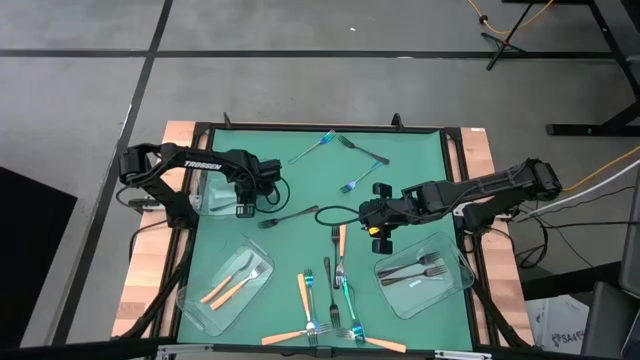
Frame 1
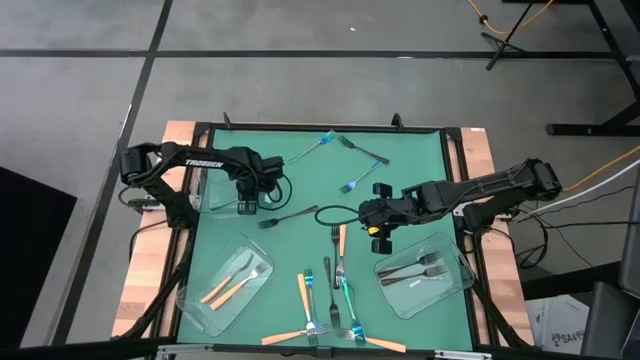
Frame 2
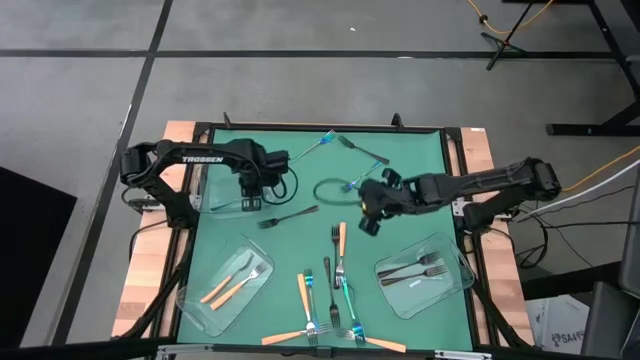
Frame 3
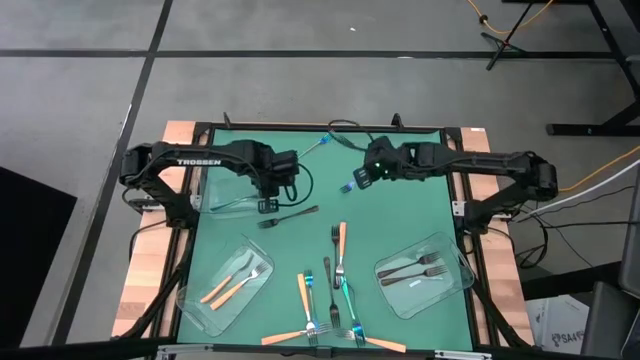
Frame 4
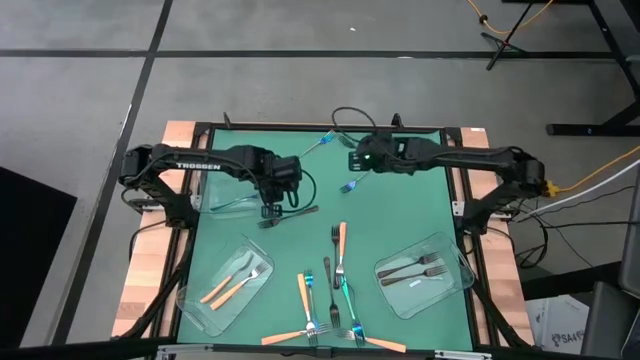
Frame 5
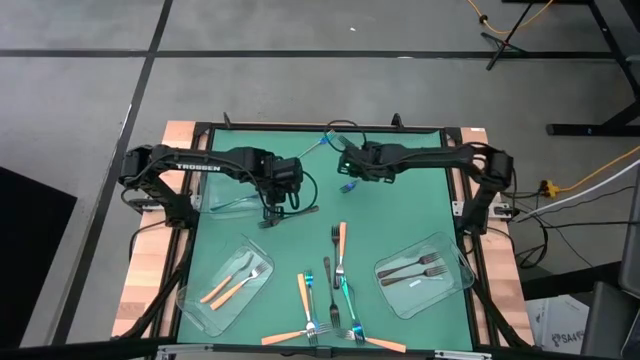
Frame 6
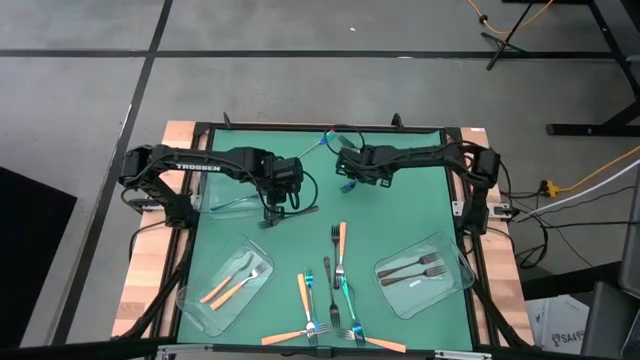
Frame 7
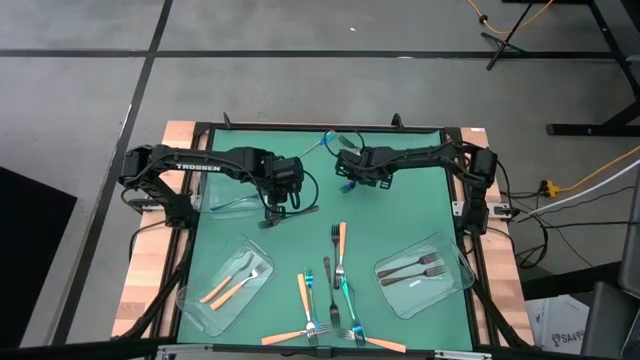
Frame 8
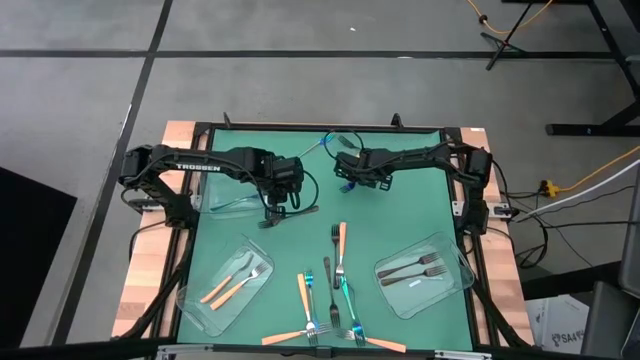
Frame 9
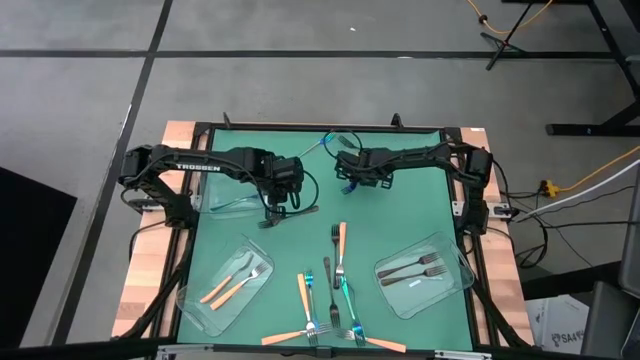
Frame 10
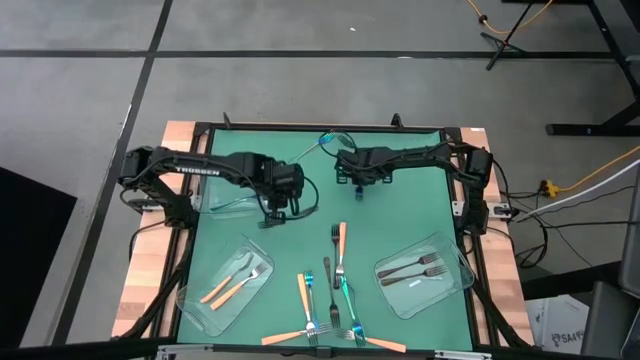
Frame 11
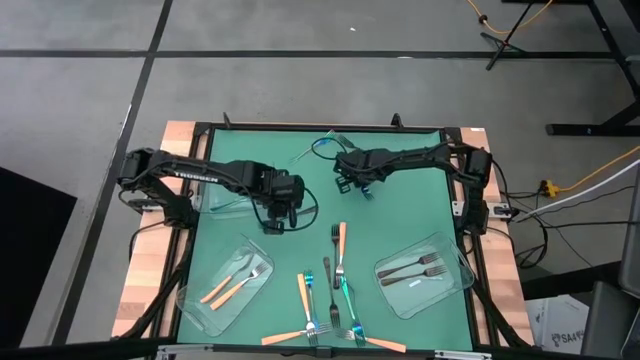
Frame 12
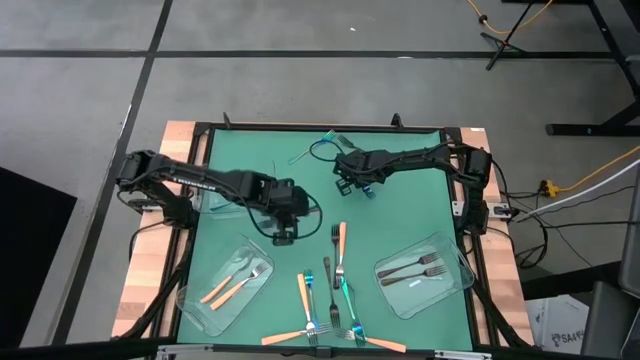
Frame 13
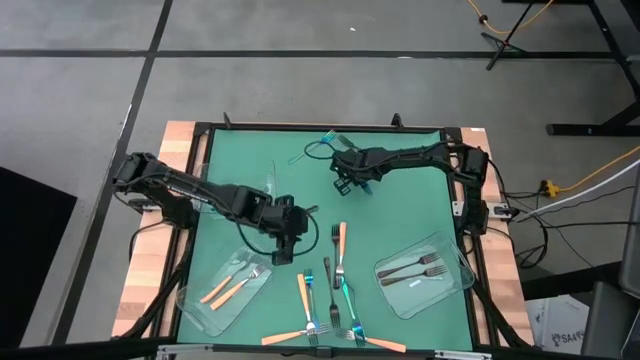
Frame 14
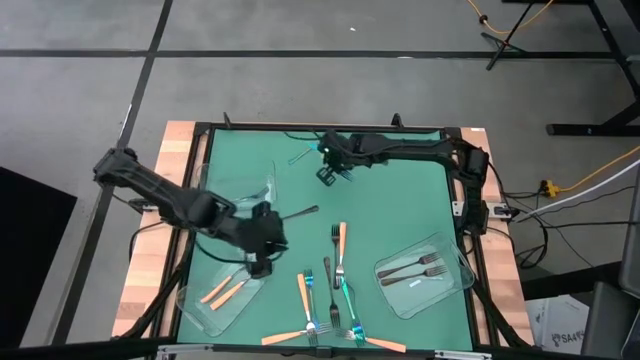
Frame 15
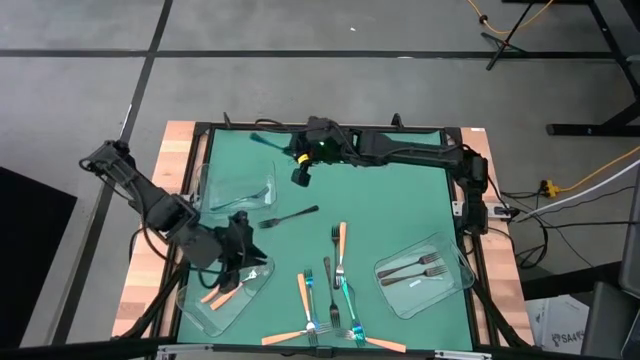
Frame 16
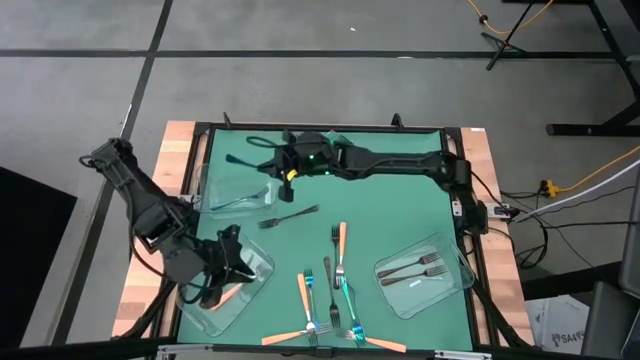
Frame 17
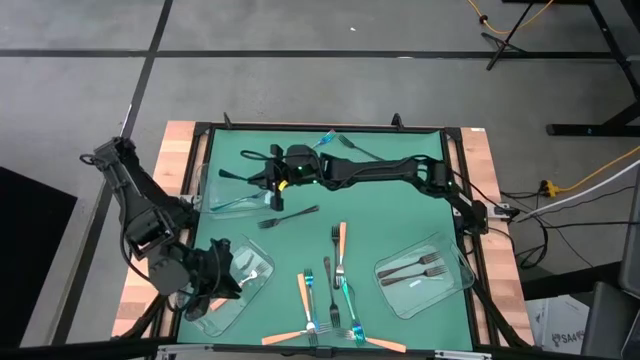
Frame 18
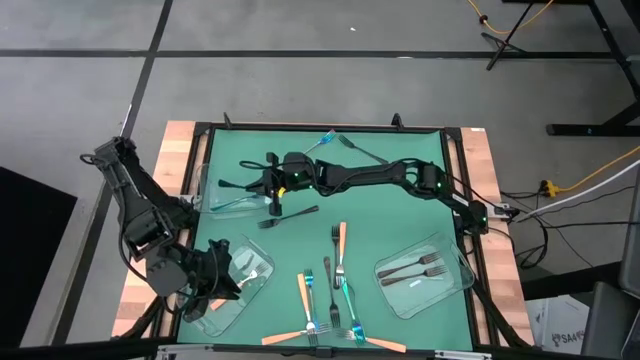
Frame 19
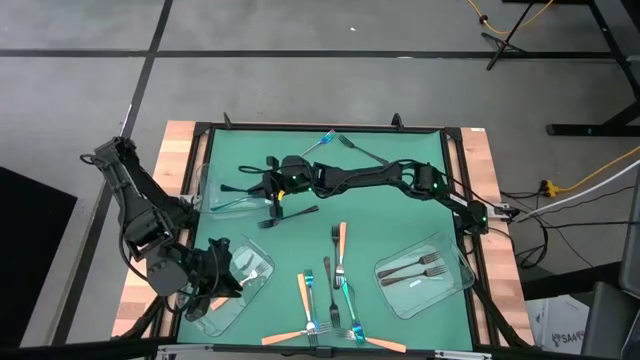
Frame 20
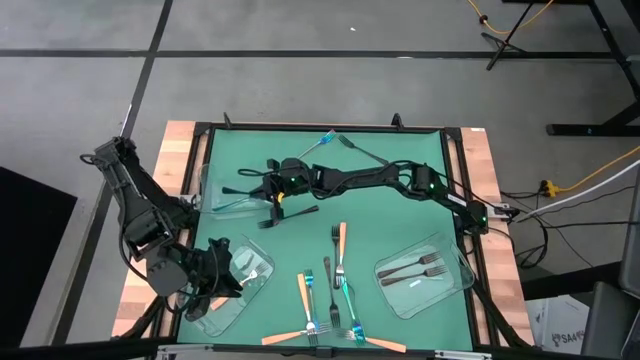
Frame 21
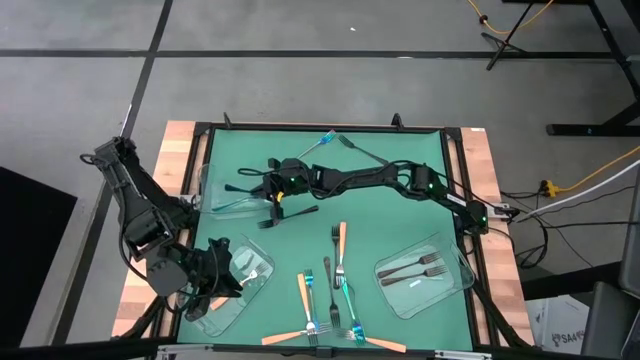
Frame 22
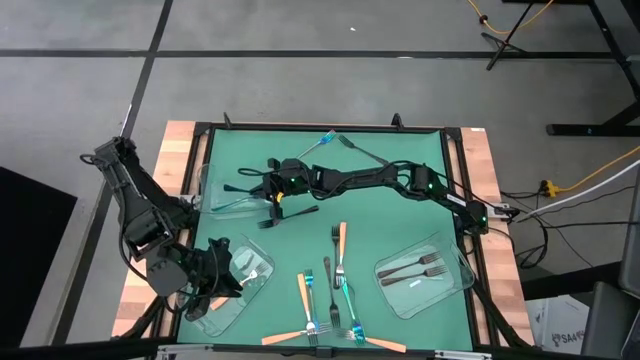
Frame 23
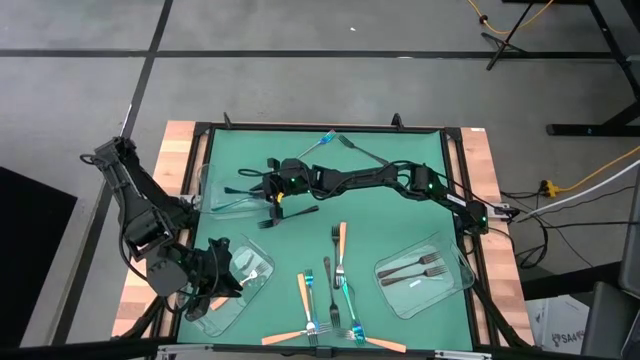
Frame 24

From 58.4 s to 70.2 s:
Task: Sort silverware by color (type)
Put the blue fork into the top transparent bin
